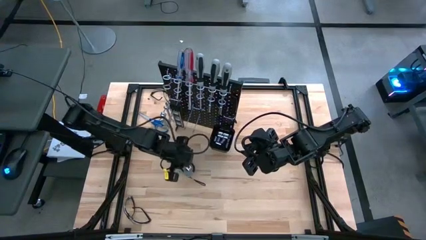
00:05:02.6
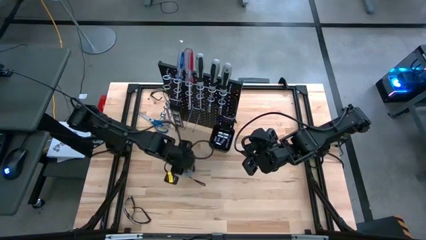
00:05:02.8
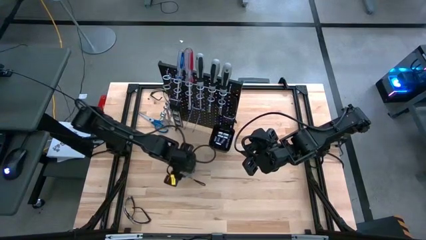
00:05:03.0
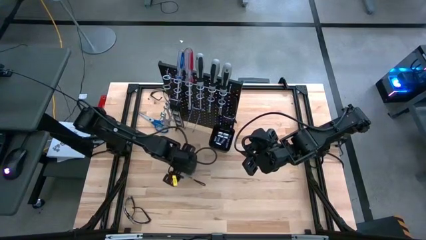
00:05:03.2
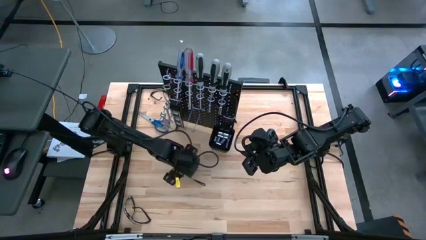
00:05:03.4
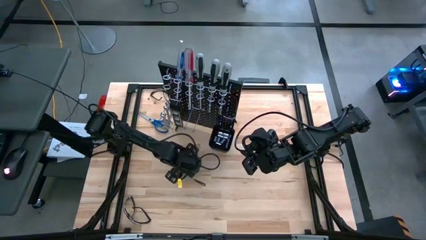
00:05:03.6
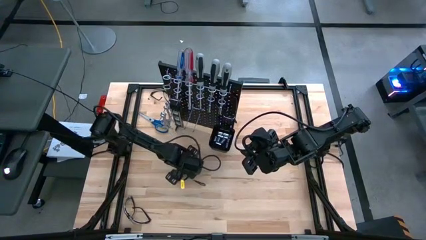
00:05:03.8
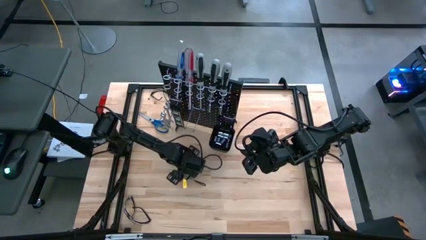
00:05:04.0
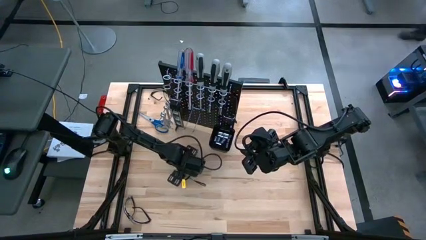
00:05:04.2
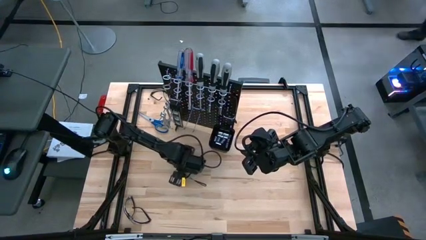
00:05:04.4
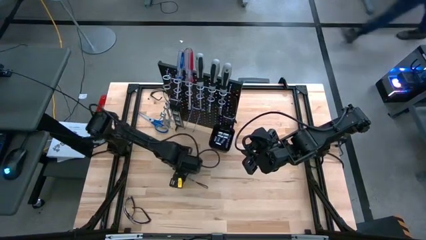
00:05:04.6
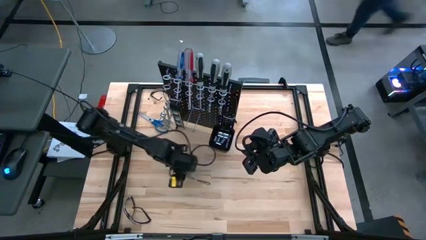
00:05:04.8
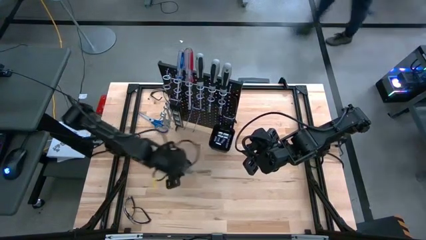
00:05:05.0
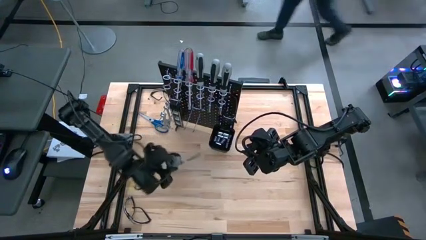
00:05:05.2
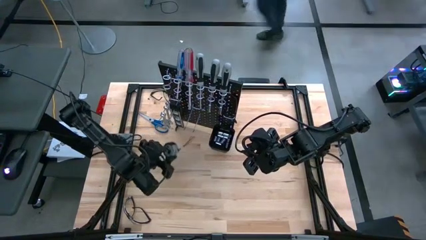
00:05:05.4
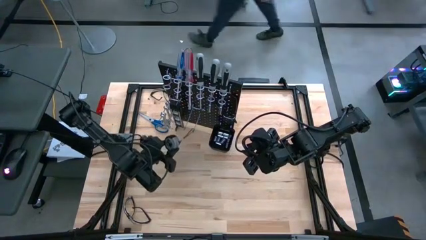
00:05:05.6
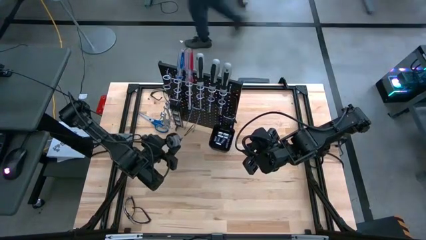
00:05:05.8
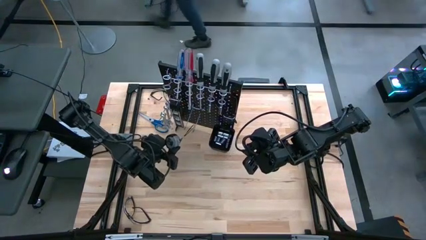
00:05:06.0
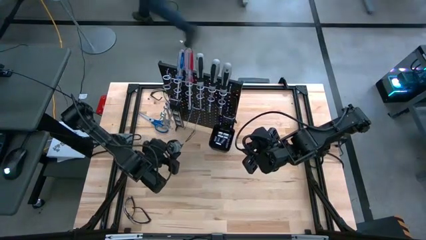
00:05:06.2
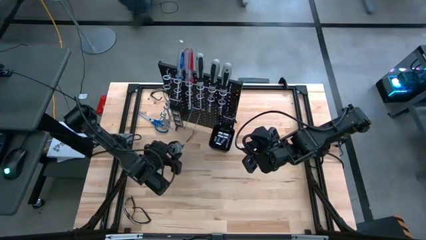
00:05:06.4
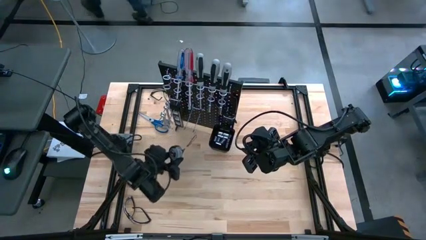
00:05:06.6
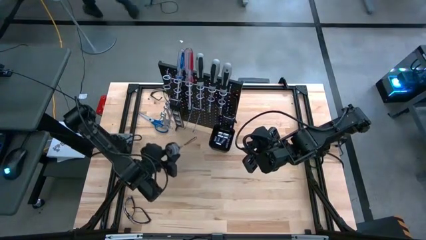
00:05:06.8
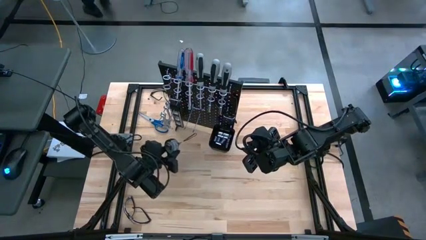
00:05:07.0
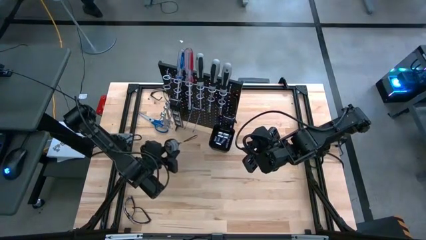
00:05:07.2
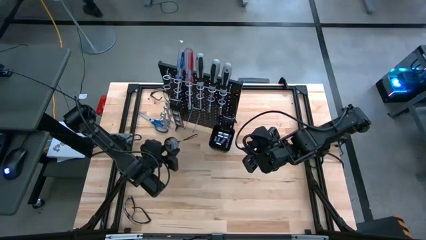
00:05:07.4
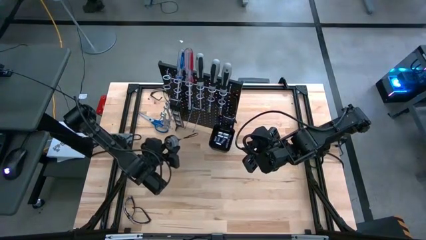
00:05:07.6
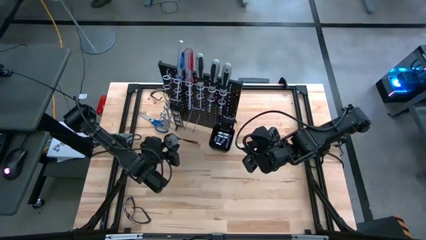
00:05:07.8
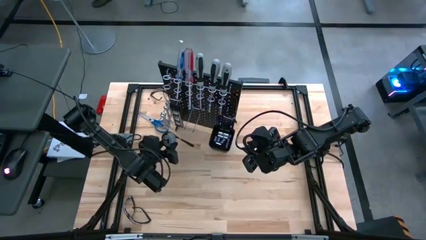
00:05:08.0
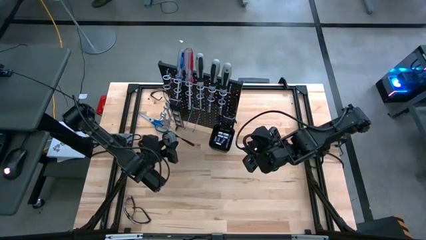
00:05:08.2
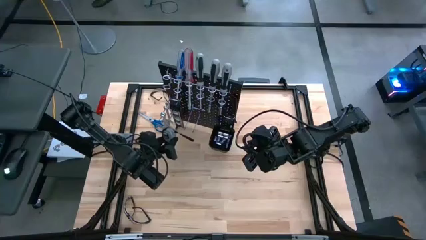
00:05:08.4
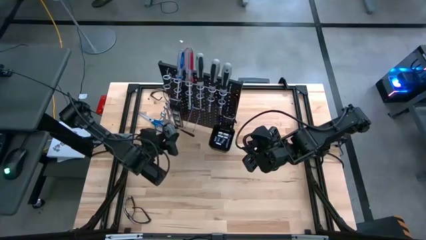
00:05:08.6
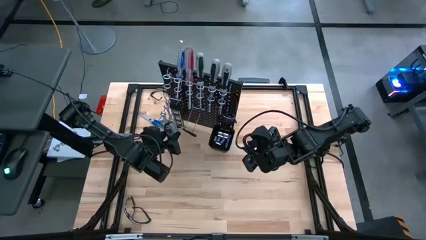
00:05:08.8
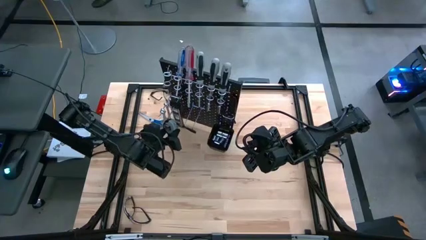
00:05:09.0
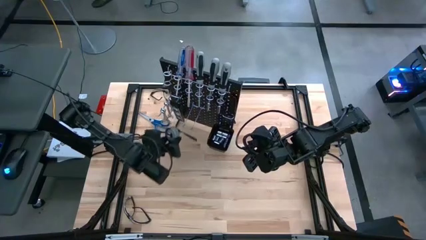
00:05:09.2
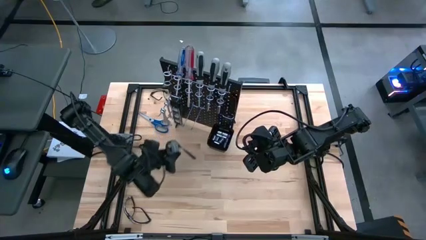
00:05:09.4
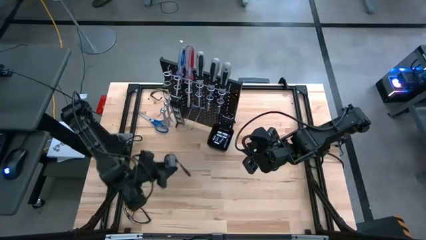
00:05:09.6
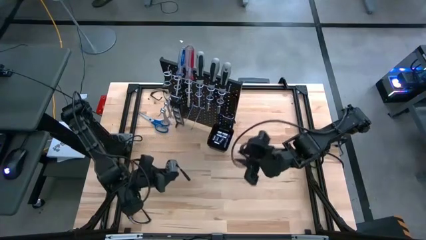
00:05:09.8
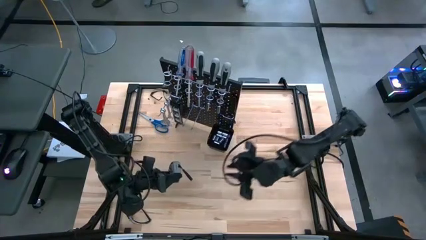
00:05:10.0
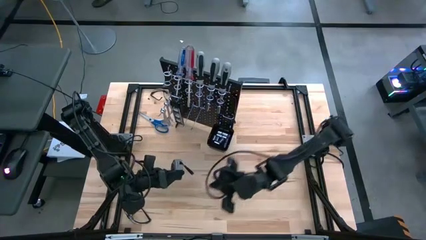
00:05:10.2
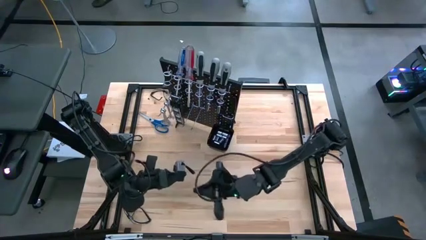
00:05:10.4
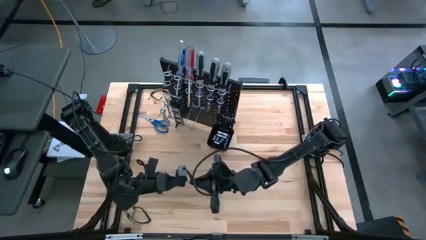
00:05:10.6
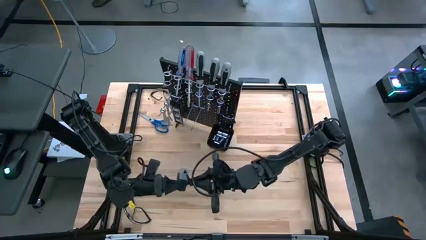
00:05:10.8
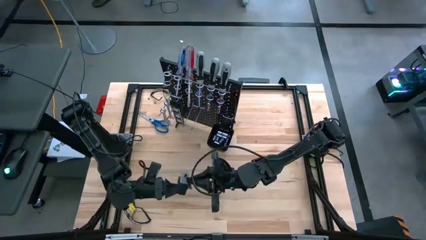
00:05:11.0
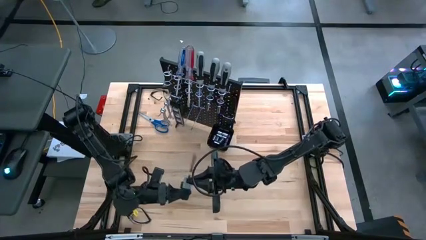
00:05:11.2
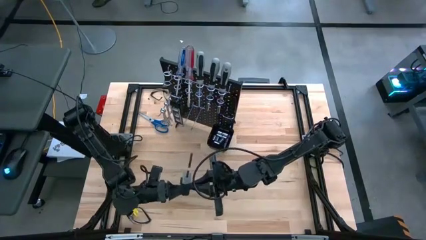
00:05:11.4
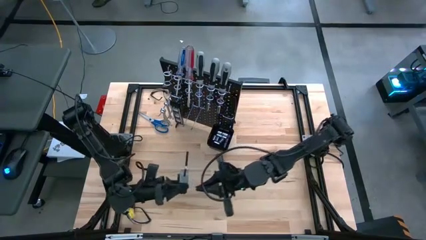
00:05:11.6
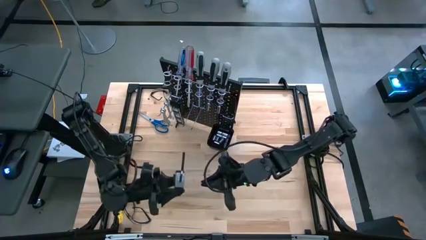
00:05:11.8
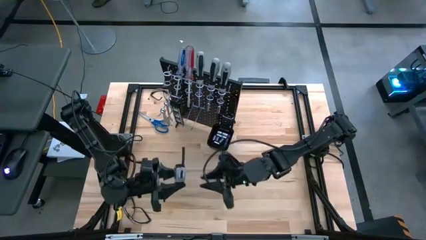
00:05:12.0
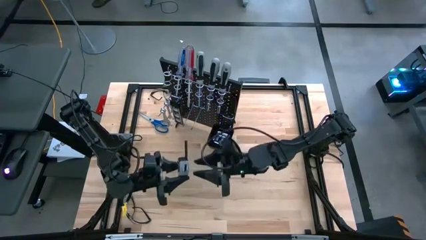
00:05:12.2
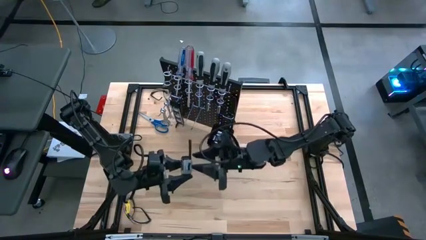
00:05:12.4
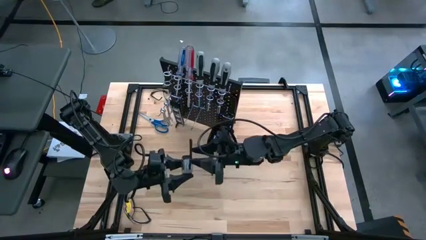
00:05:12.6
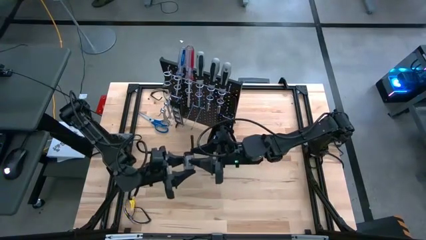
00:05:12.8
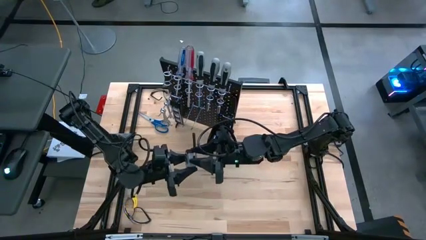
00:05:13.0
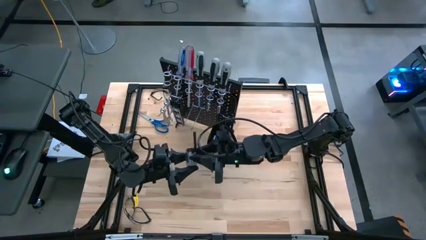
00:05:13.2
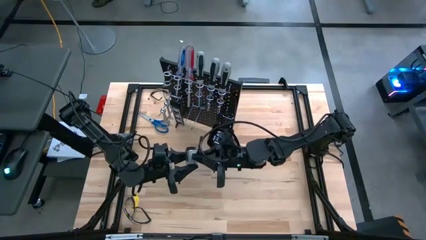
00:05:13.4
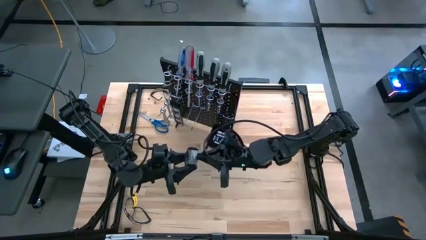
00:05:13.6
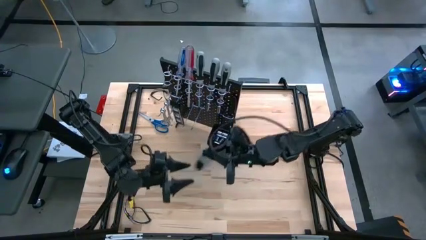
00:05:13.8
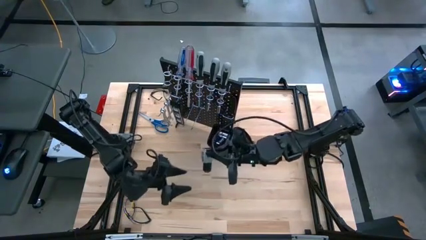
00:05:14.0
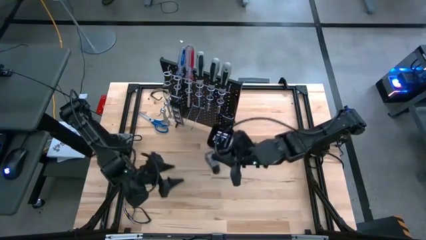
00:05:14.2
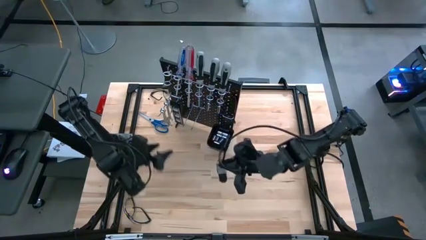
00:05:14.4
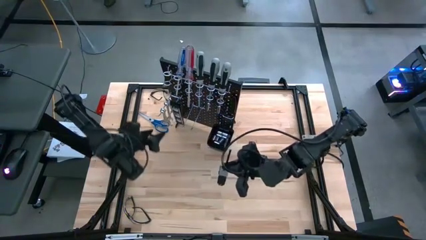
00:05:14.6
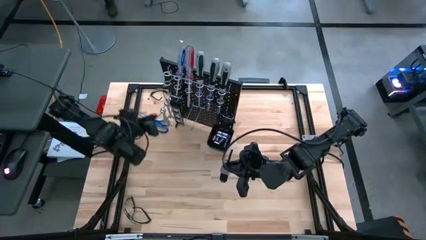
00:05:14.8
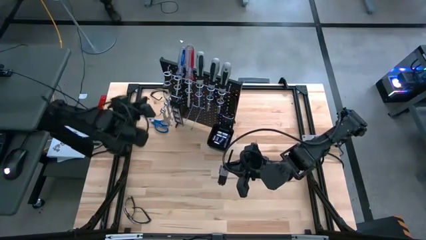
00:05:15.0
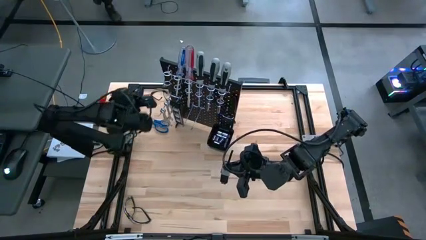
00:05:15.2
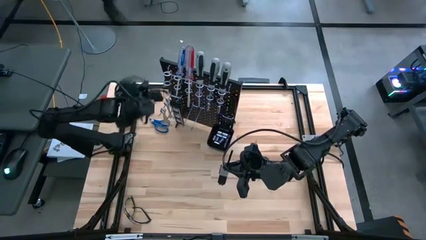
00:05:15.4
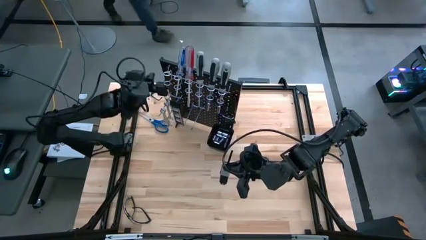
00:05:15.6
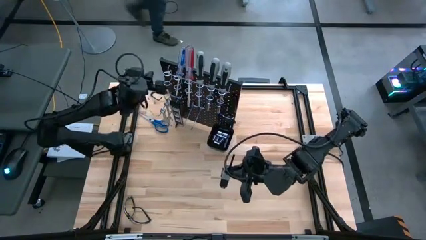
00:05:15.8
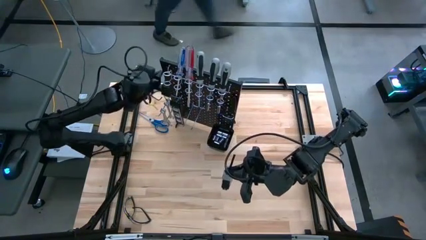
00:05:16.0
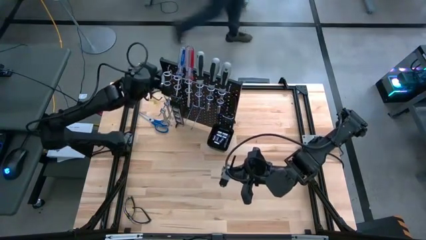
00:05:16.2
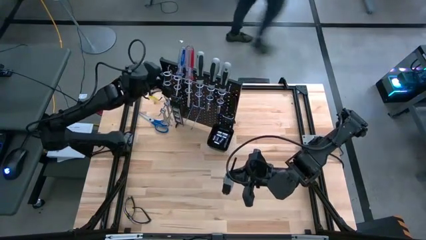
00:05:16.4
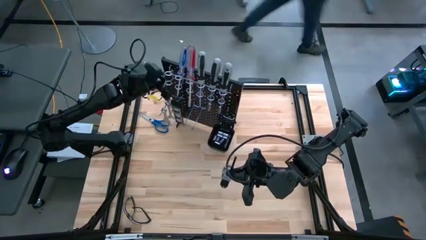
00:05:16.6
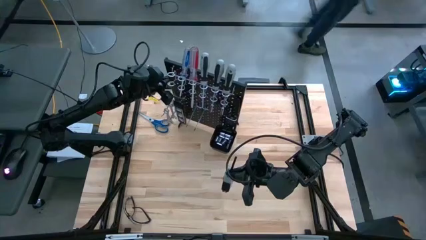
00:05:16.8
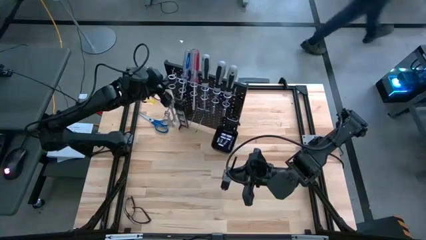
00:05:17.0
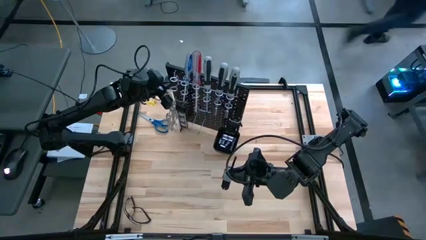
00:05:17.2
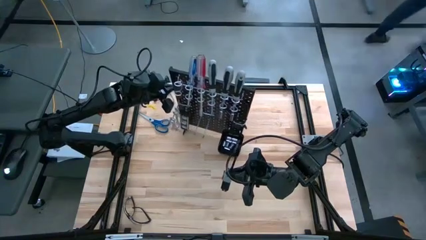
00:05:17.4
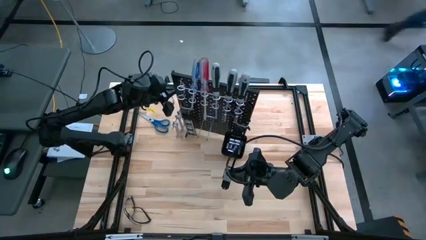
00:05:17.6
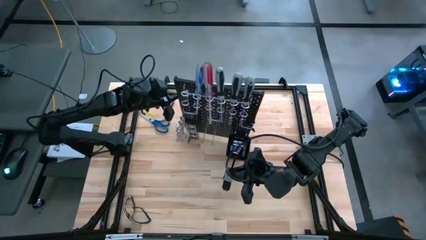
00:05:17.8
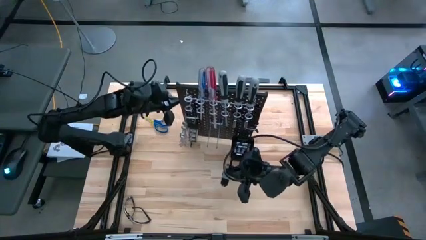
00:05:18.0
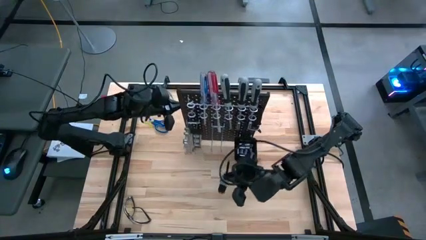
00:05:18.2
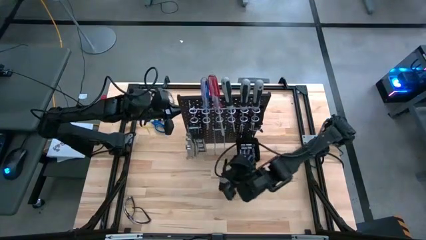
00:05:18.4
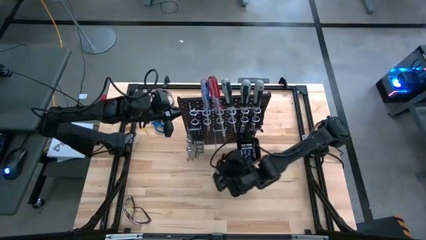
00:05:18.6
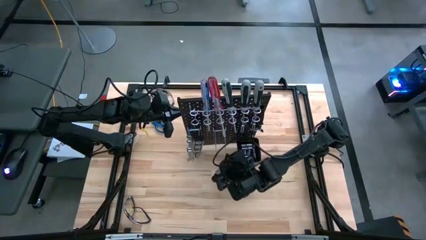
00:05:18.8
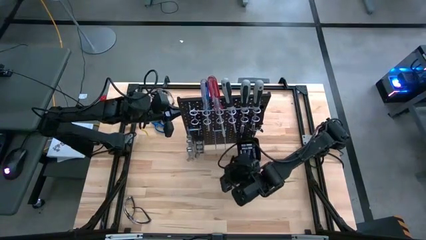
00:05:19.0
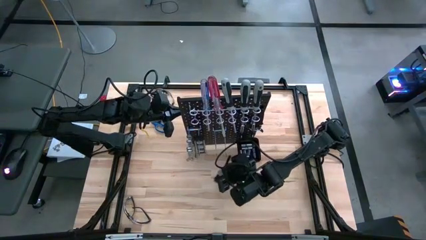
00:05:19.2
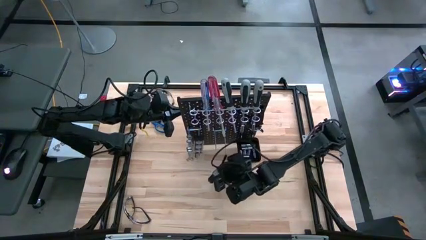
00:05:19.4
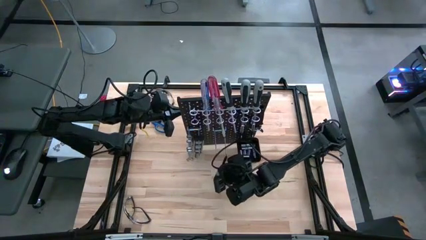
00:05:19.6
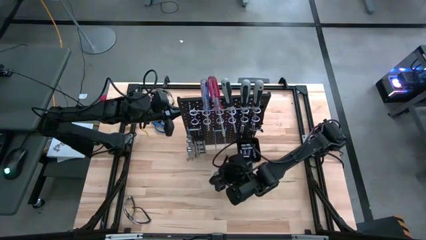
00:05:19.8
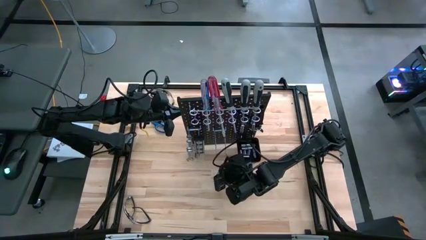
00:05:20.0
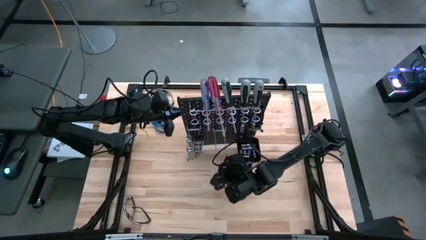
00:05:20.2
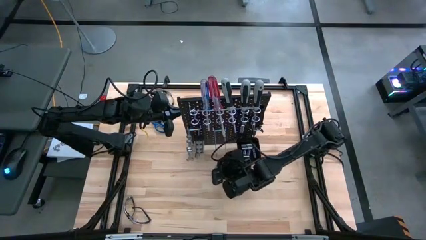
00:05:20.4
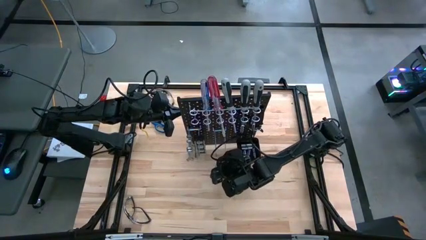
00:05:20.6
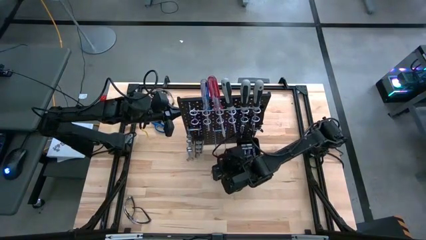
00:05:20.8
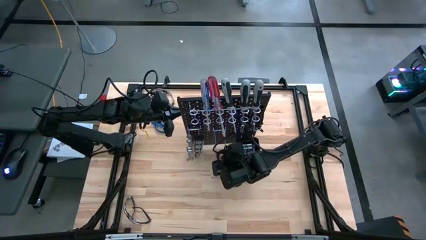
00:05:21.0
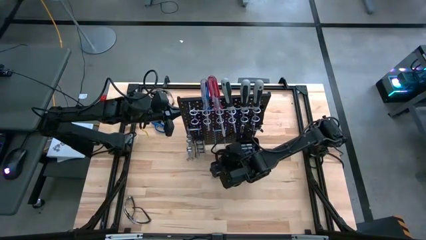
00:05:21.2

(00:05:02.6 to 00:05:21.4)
Task: Hang tools onto peg board
Hang the gray tape measure on the pegboard
